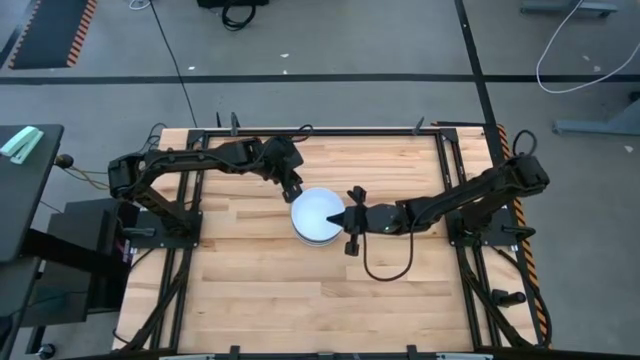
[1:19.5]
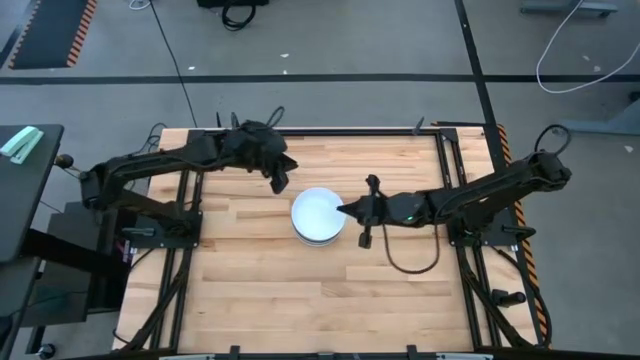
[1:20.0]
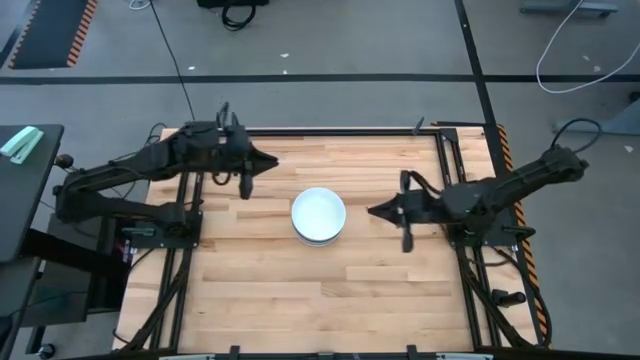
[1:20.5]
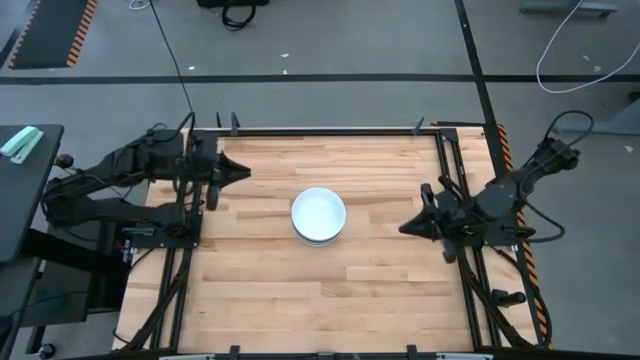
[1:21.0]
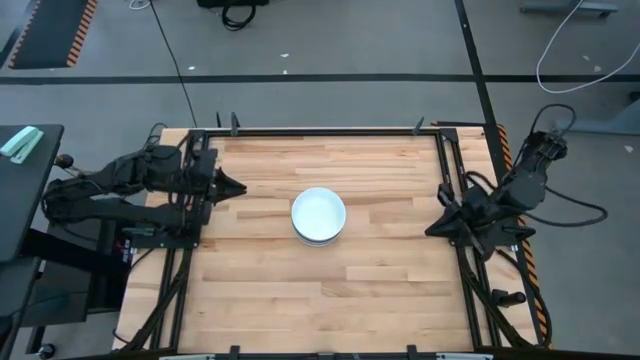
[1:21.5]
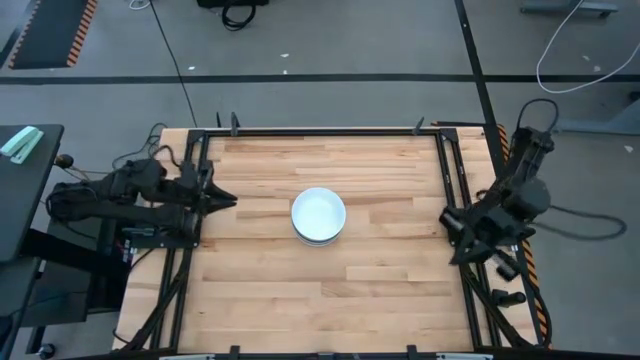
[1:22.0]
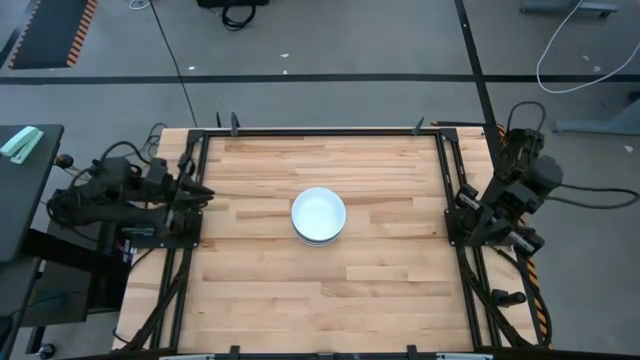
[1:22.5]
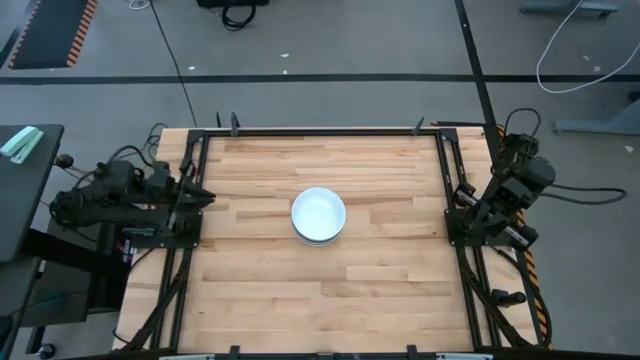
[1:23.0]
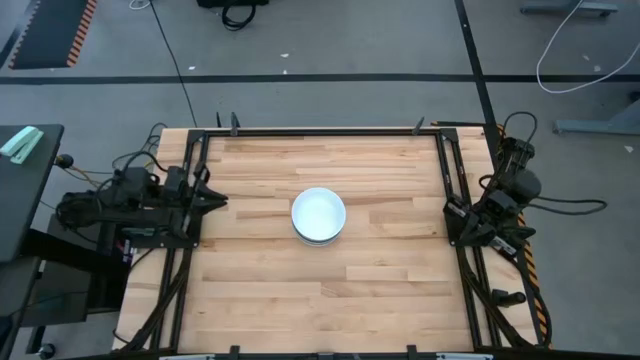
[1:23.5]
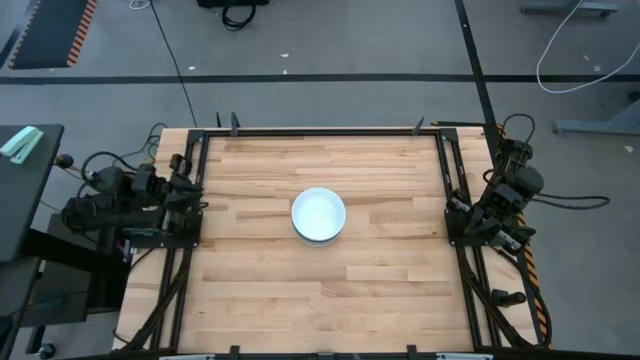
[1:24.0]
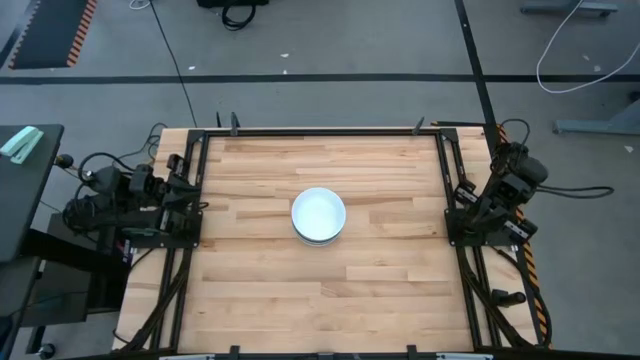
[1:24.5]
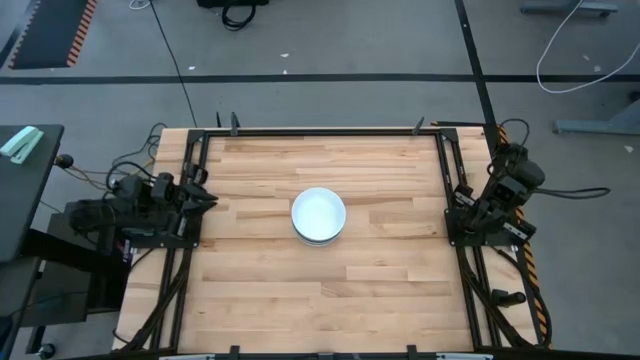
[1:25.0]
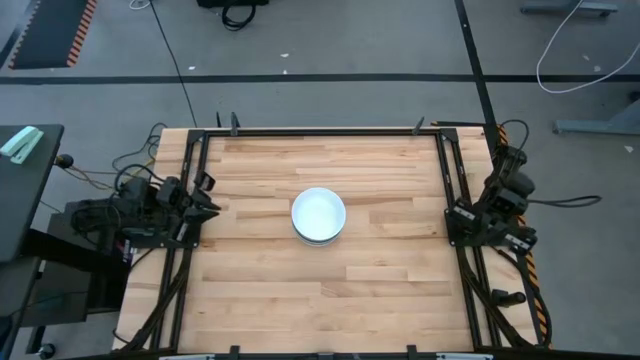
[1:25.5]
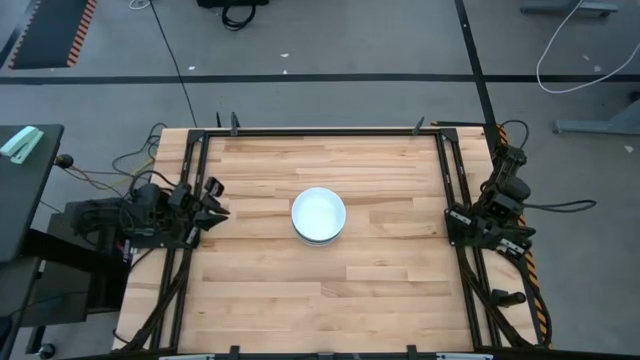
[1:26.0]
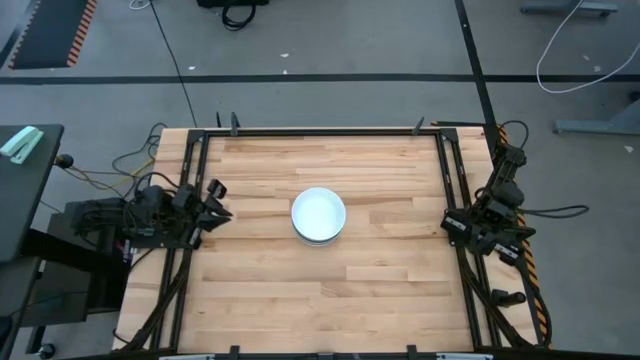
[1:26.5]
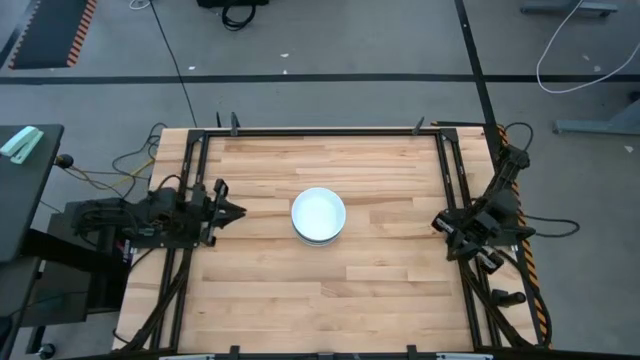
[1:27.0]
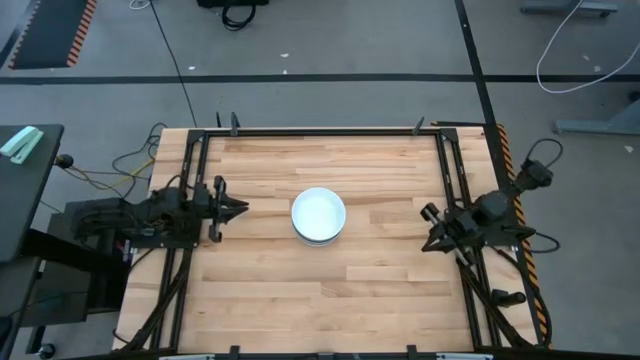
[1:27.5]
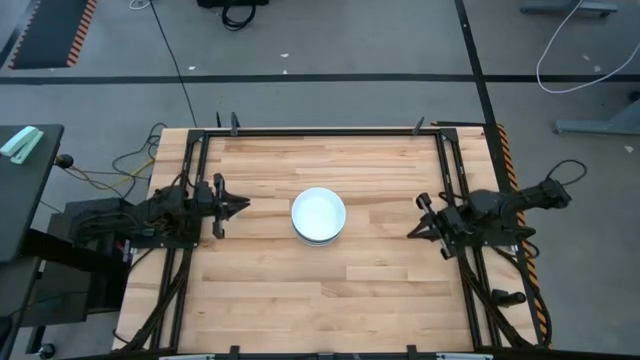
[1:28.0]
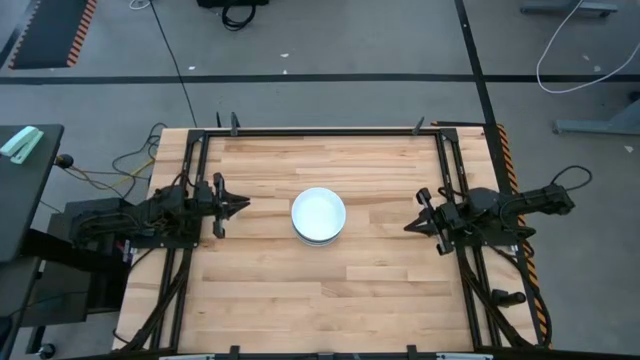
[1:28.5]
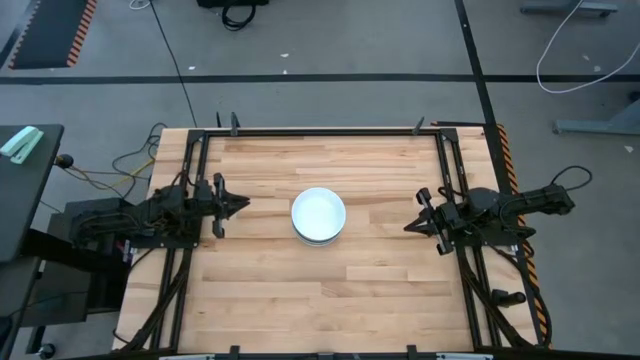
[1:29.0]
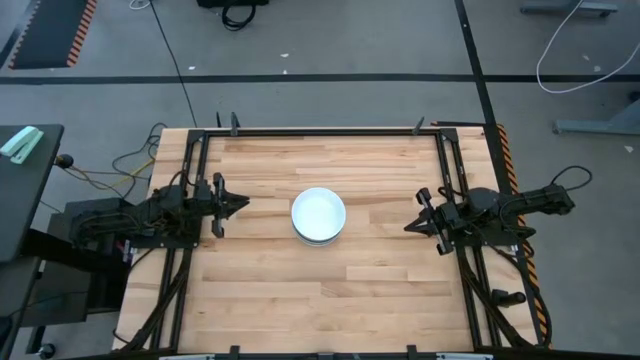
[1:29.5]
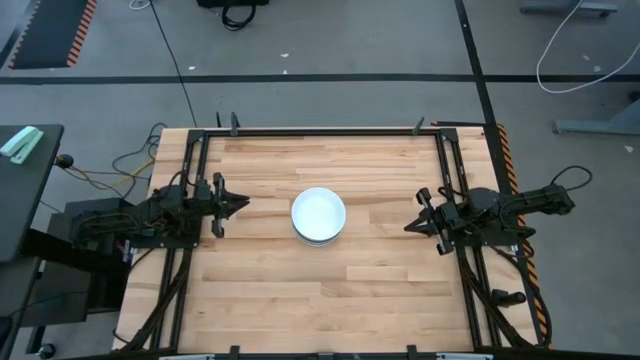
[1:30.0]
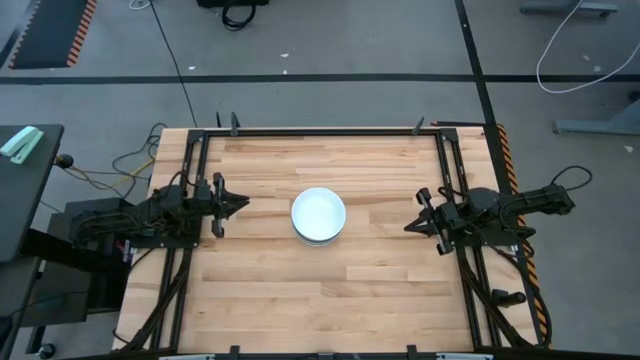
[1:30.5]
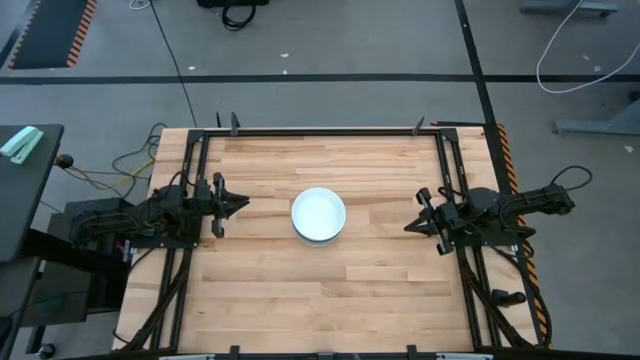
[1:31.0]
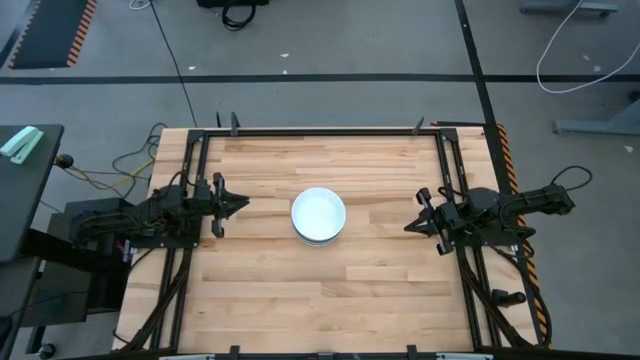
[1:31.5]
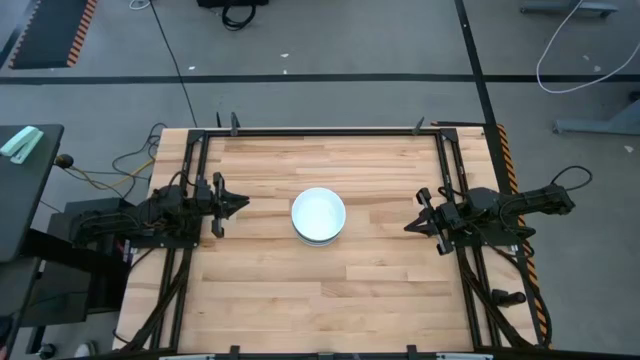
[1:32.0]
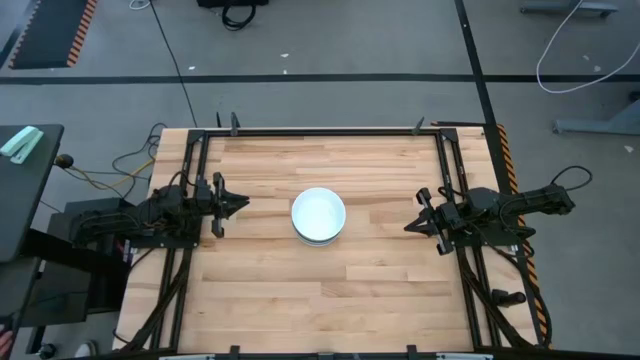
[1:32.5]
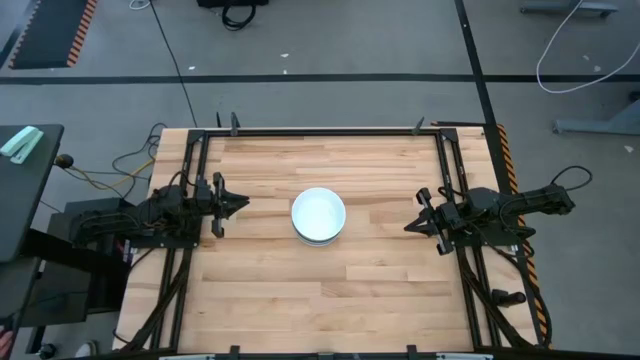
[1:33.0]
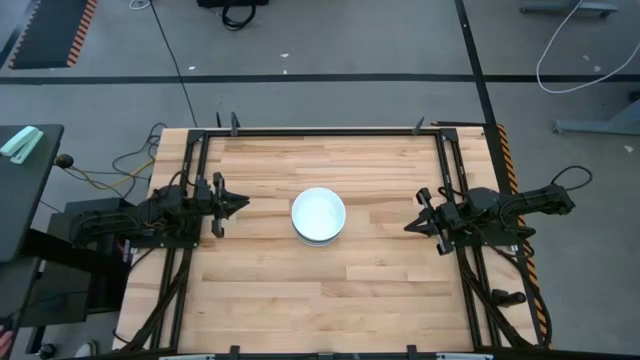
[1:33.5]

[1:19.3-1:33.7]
Task: Nest bowls inside each other
Return to Home Position

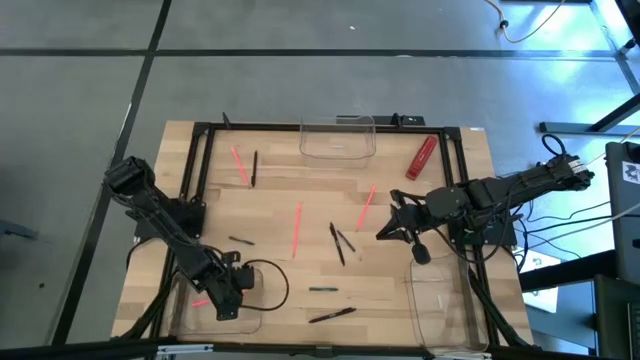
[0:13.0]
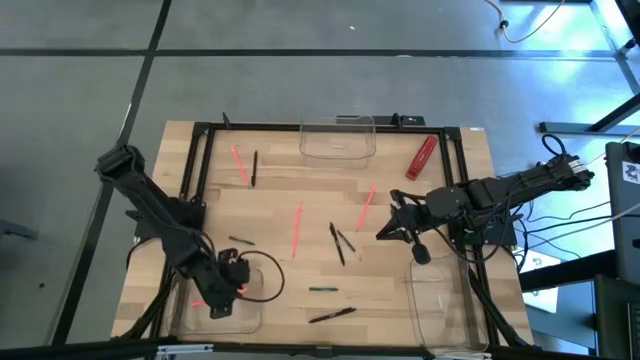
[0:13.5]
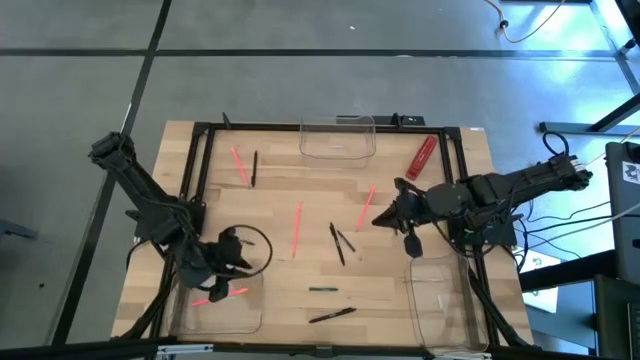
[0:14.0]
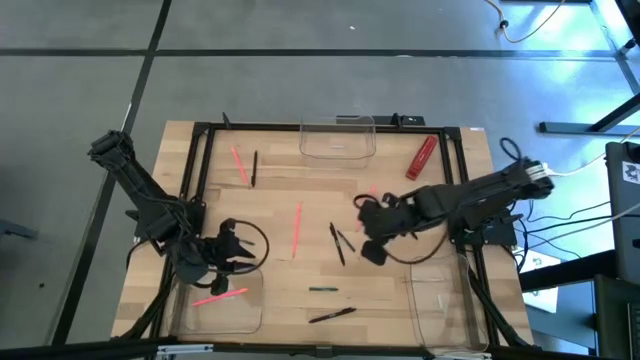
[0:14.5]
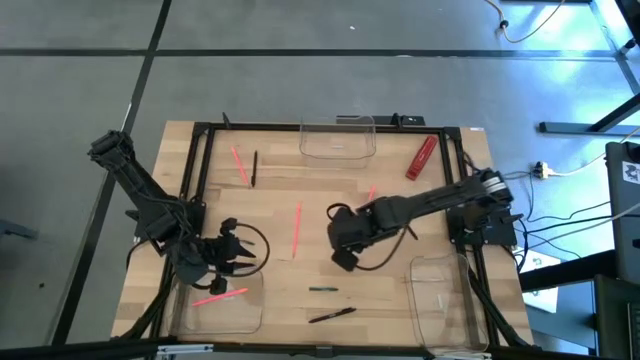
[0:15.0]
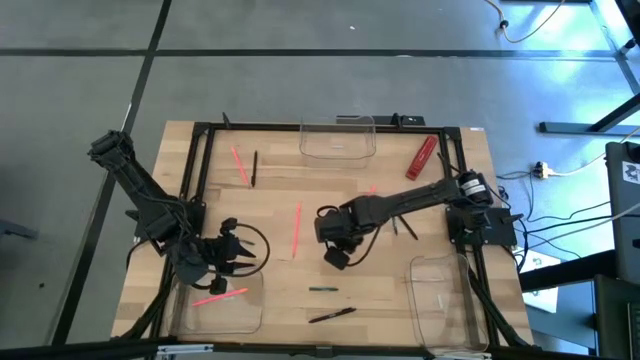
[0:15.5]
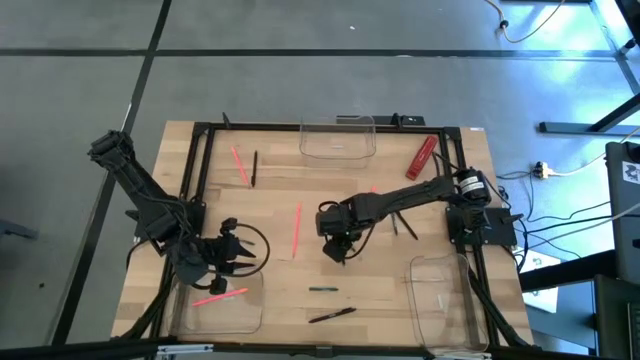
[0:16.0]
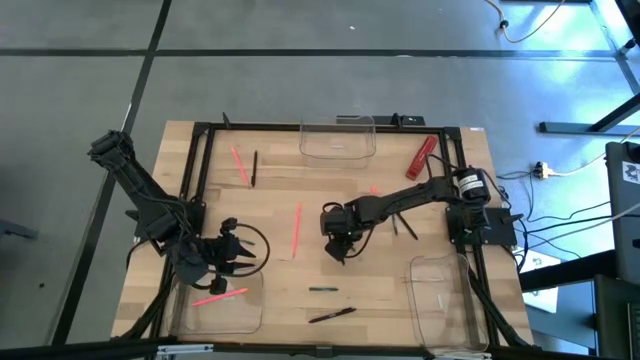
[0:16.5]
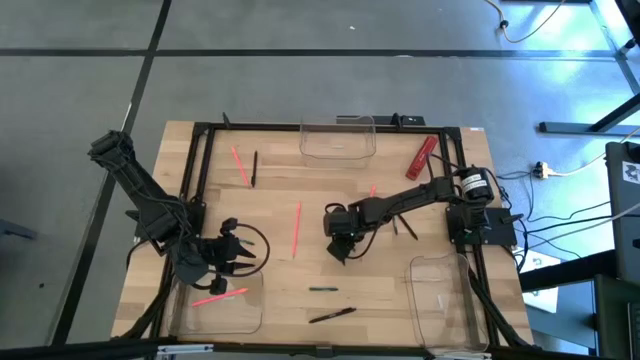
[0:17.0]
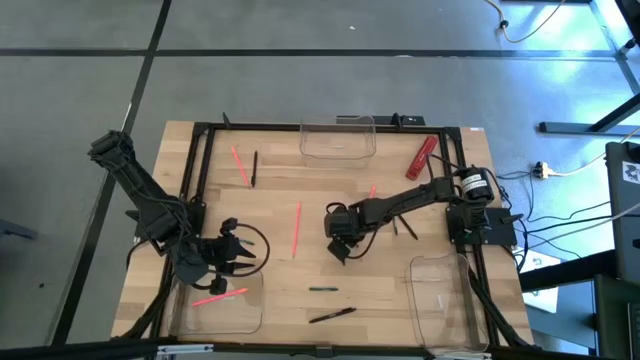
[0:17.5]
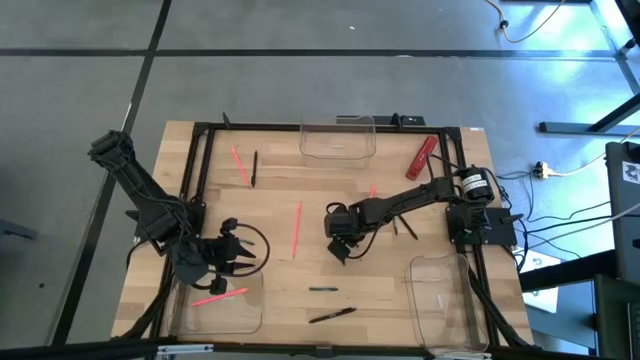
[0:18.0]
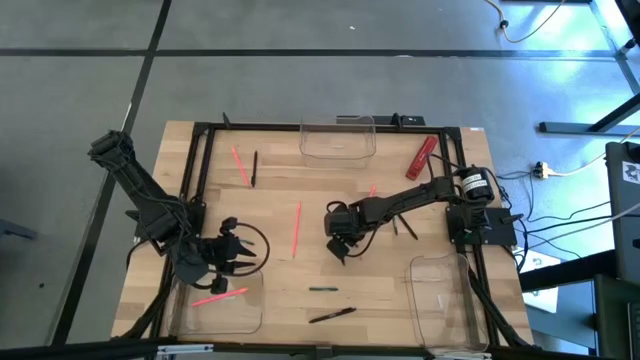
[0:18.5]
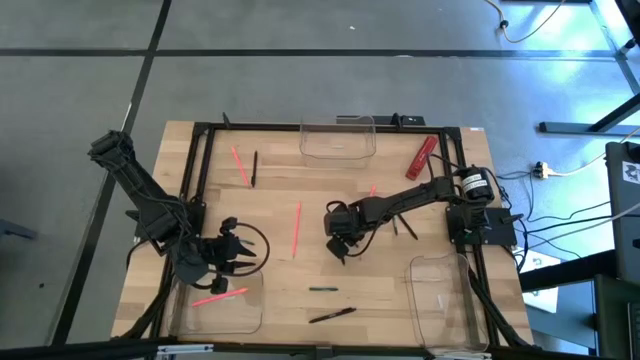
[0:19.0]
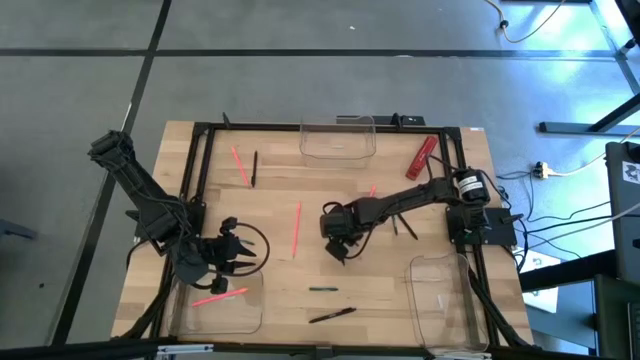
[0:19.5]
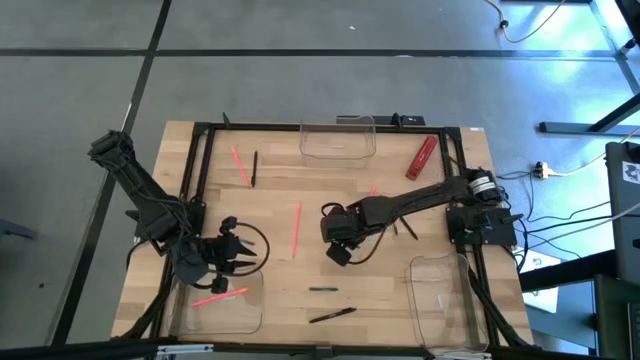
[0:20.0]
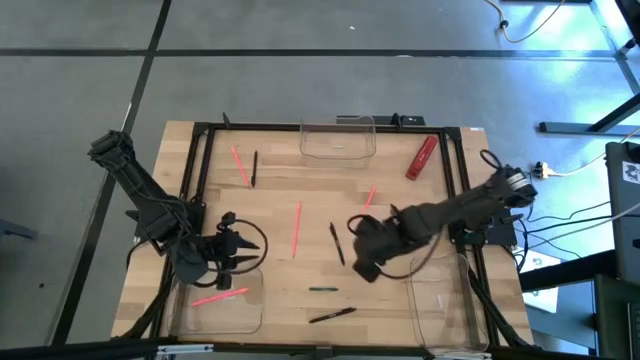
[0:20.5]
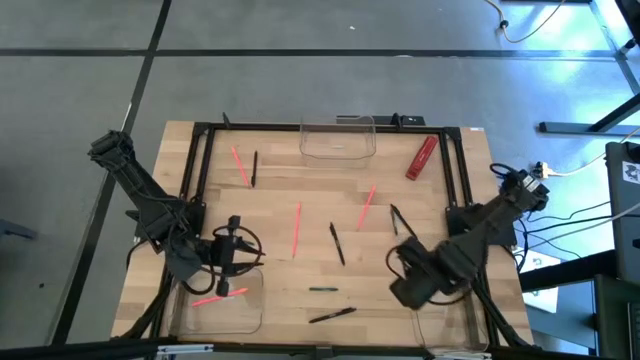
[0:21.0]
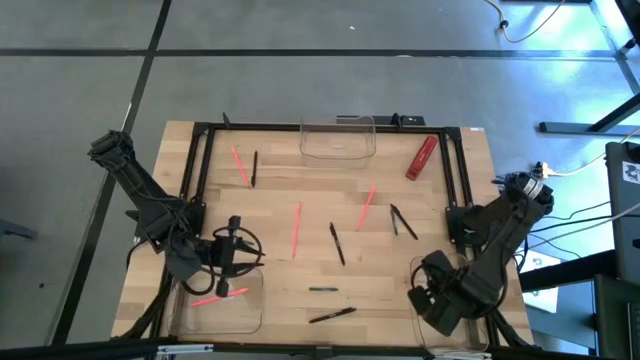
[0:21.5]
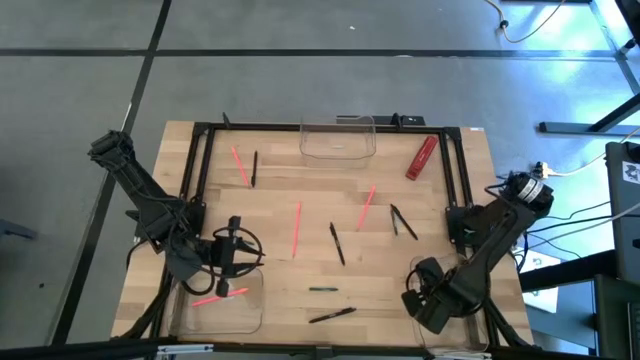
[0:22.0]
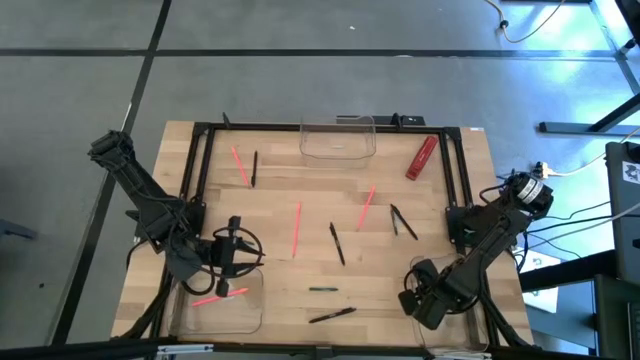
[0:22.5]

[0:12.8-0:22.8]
Task: Sort crayons/erasers/pens/pencils in bins
Put the green crayon into the bottom right transparent bin
